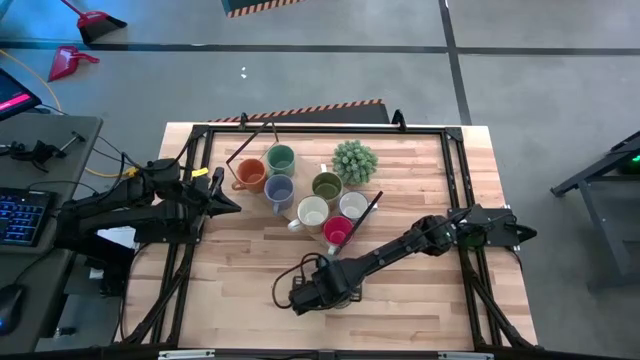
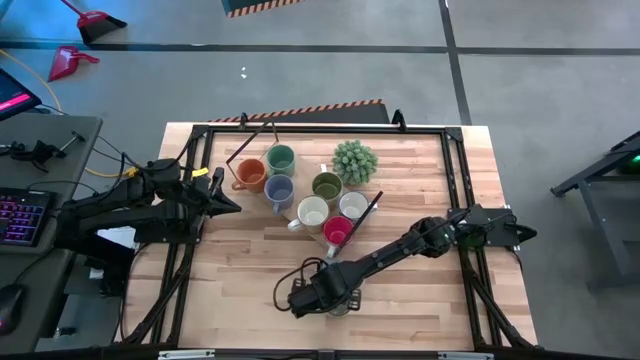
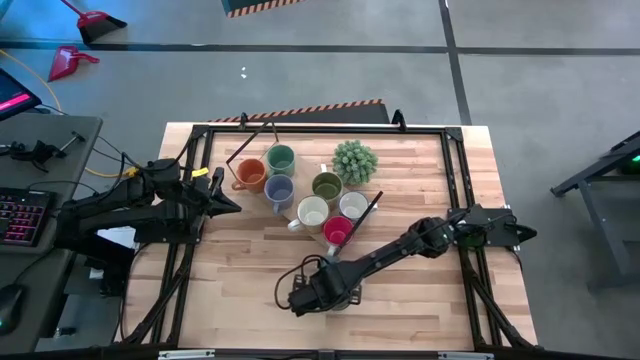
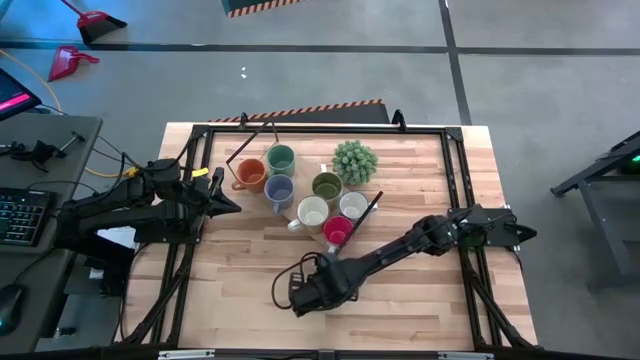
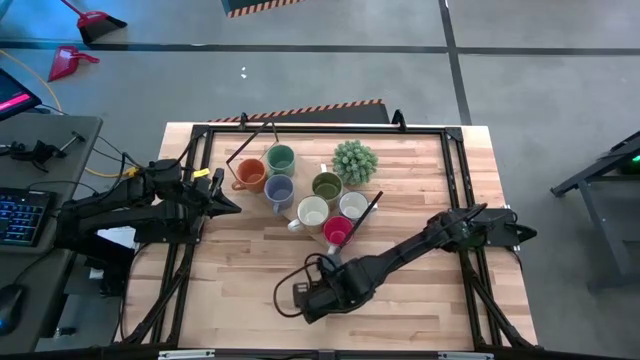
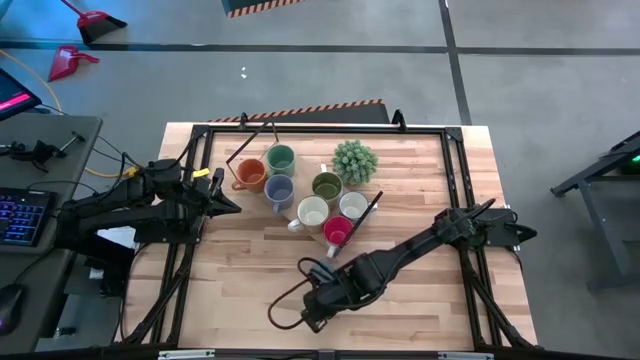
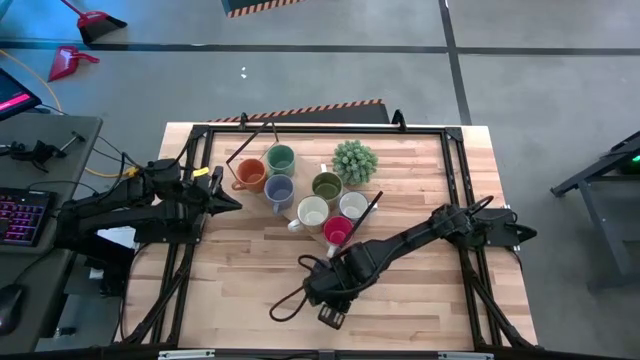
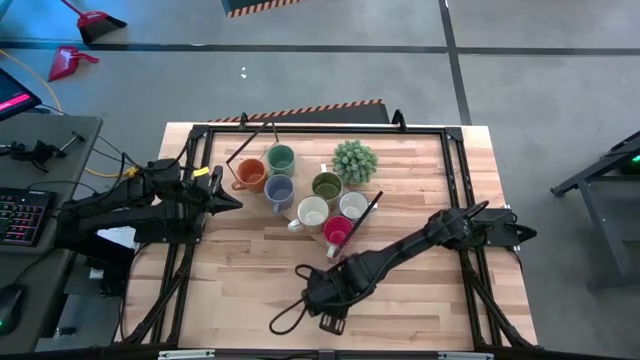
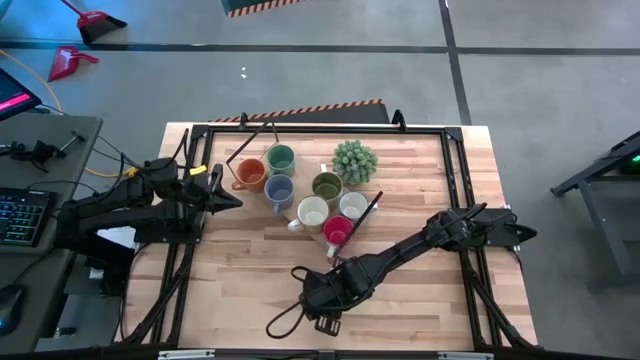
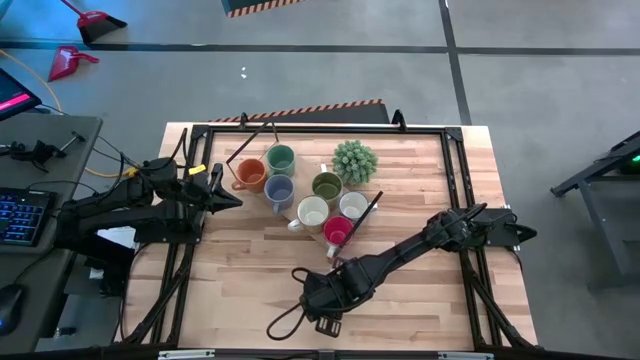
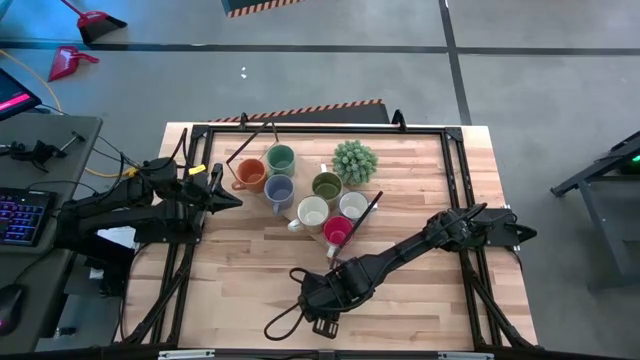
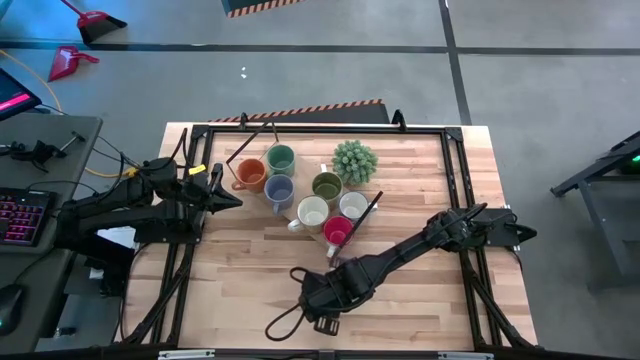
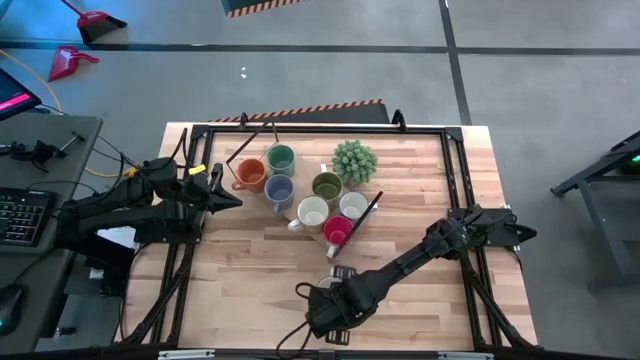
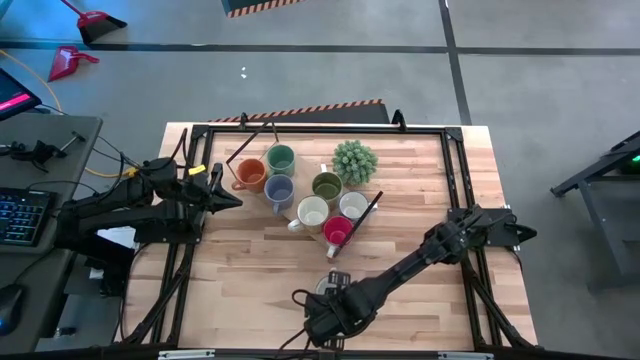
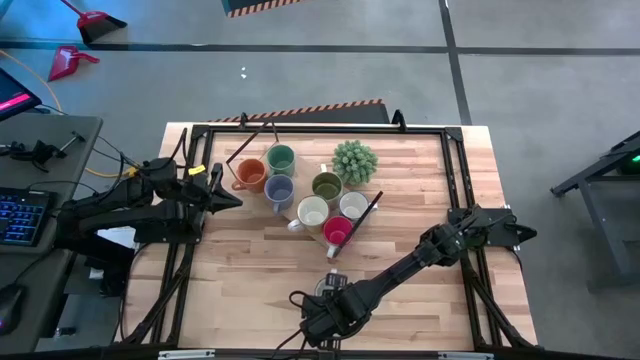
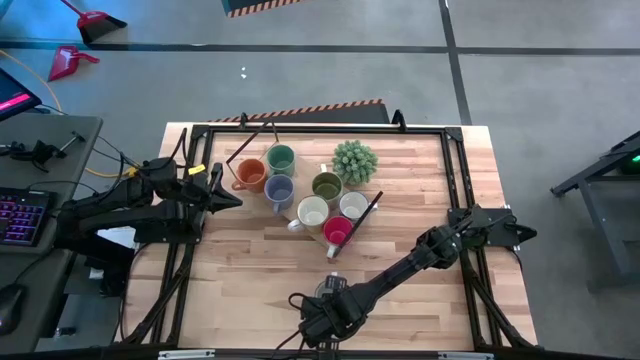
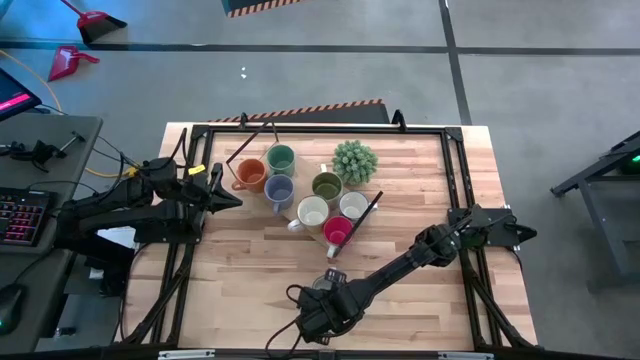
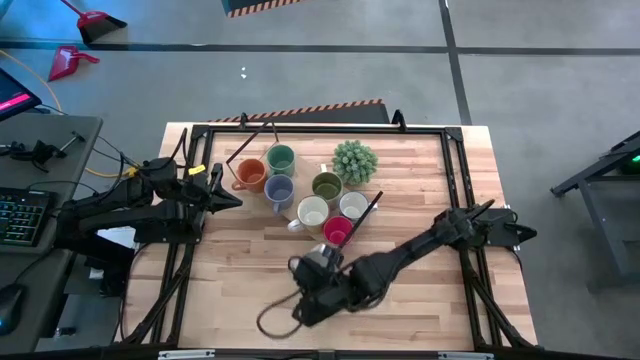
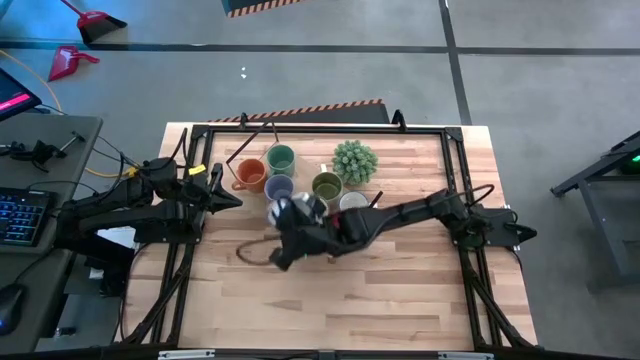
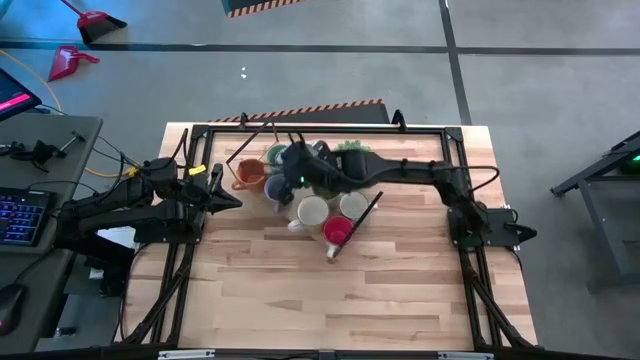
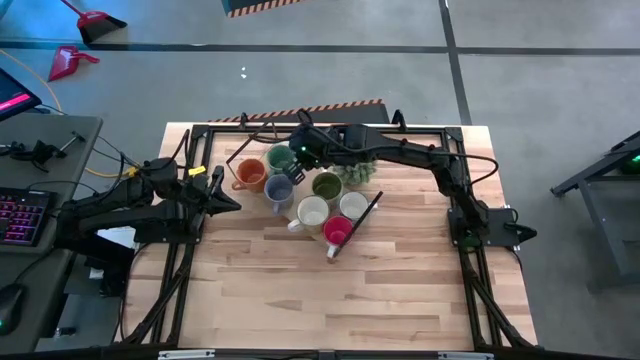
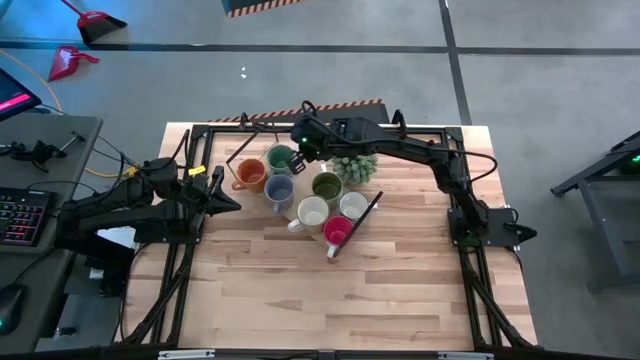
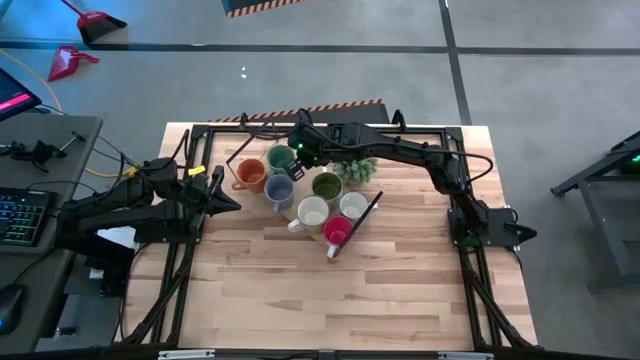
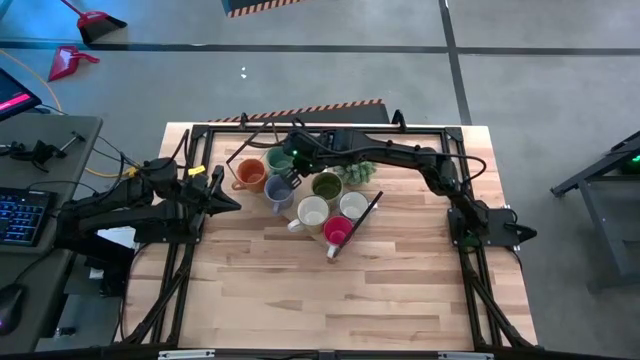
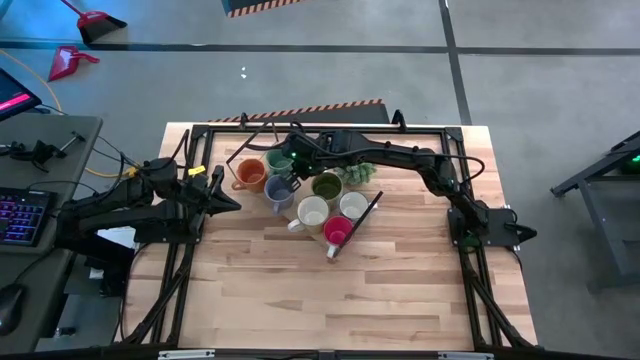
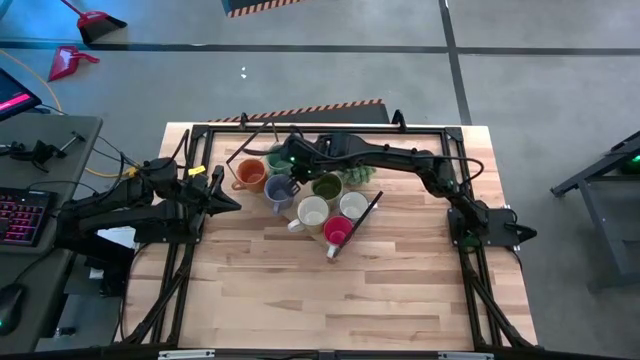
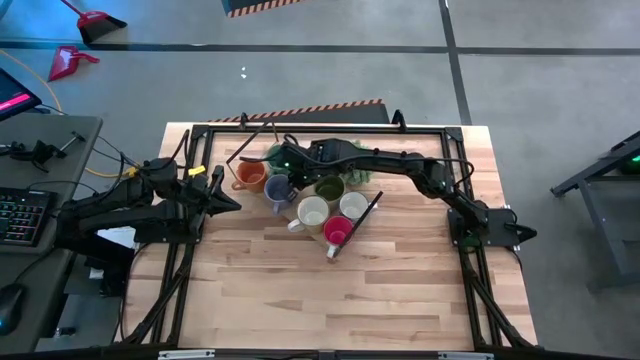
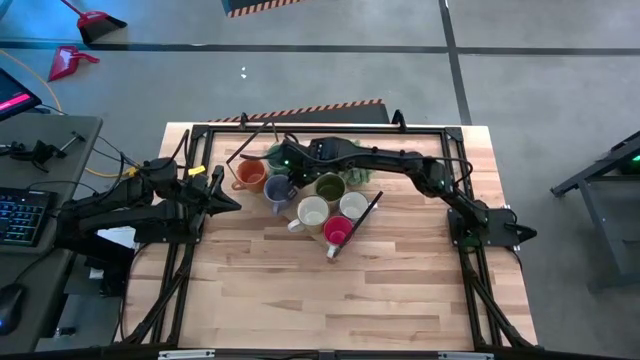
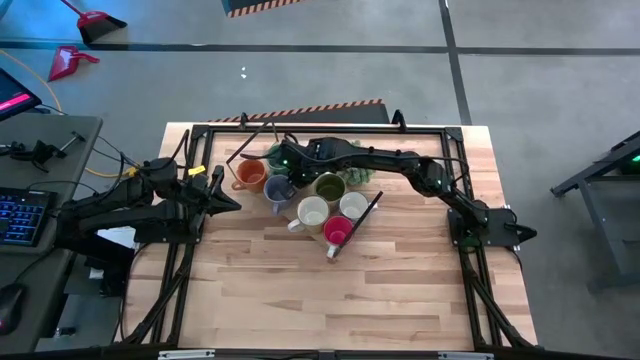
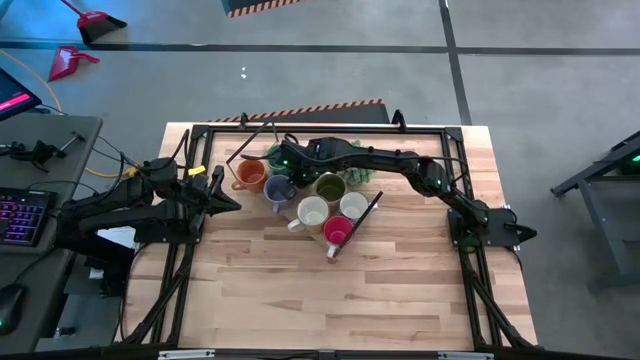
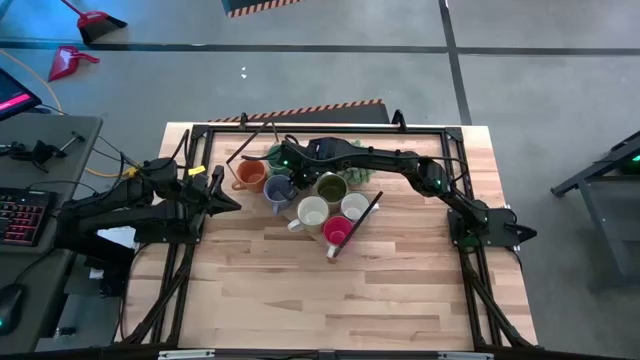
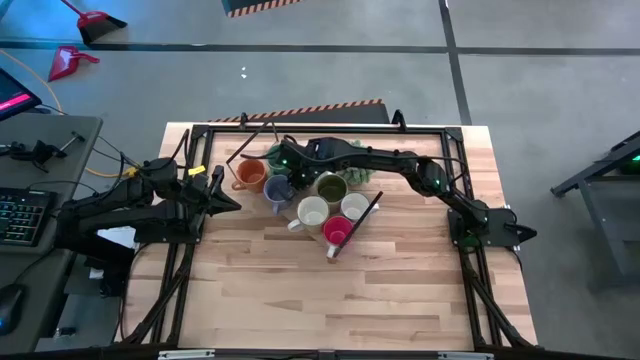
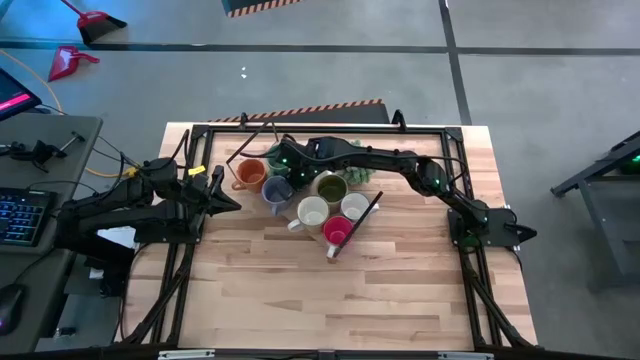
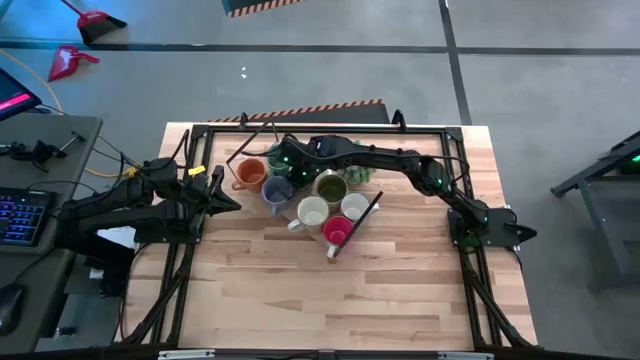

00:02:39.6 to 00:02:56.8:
Task: Place coffee mugs
Put the blue patterned mug on the shelf

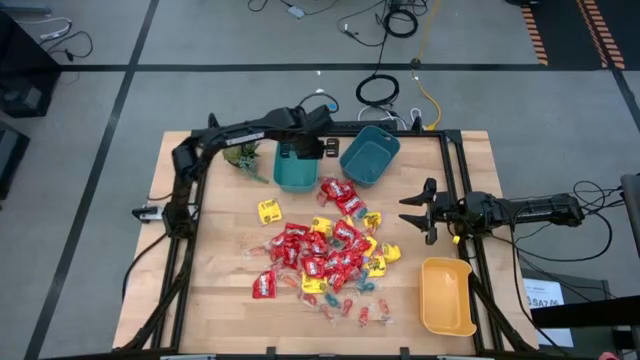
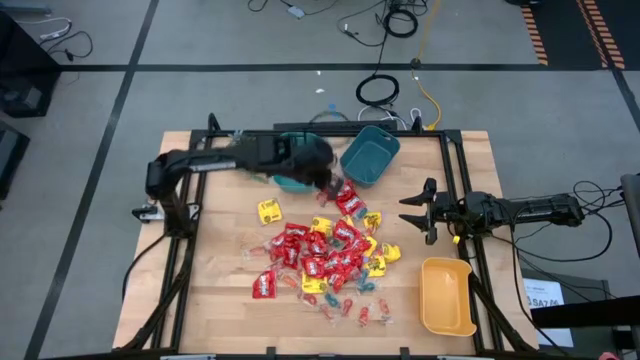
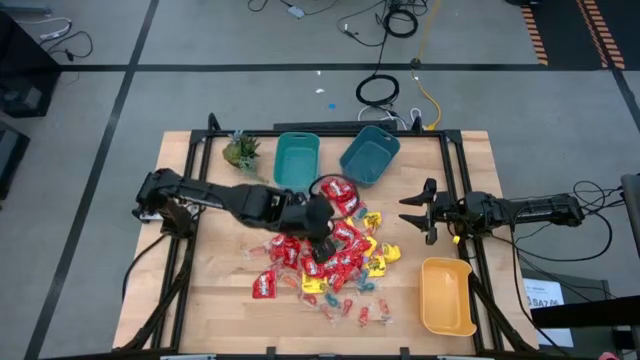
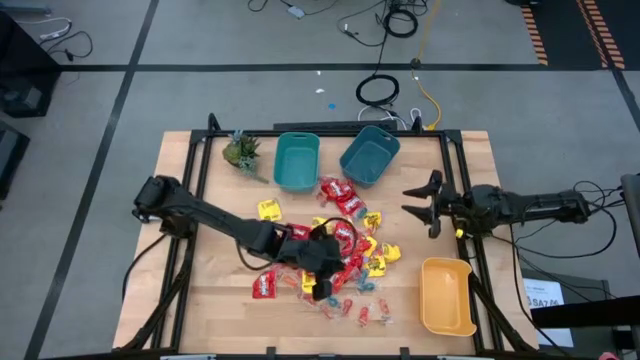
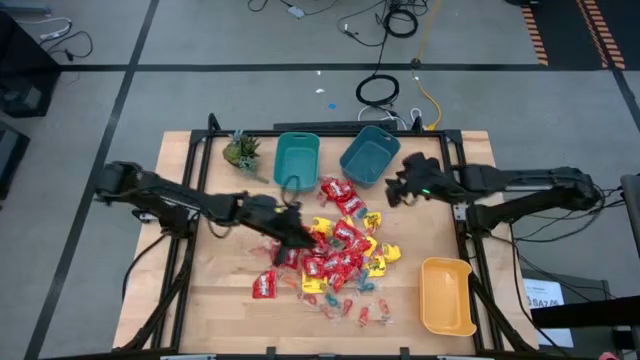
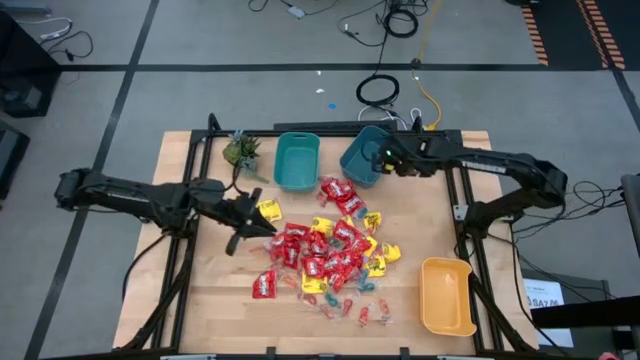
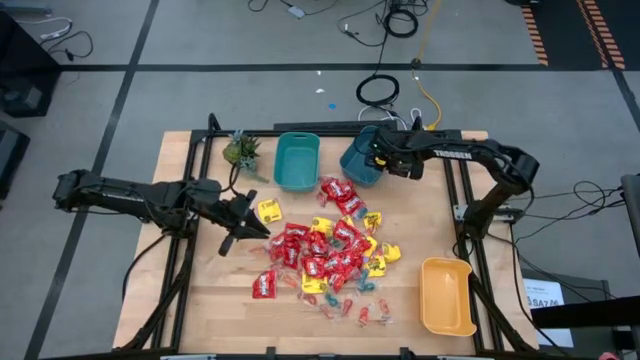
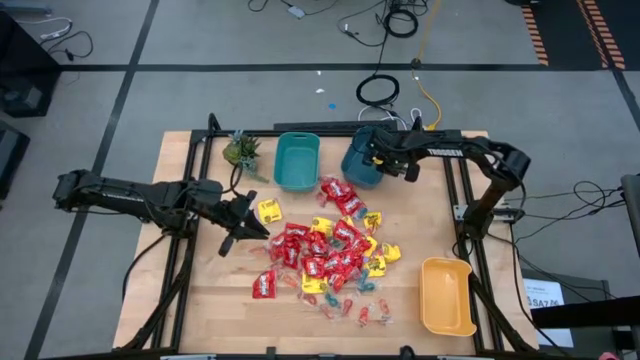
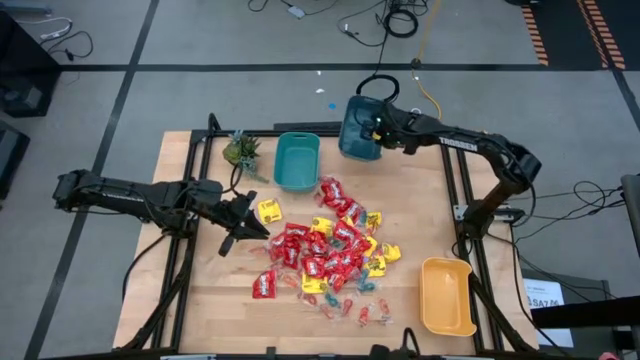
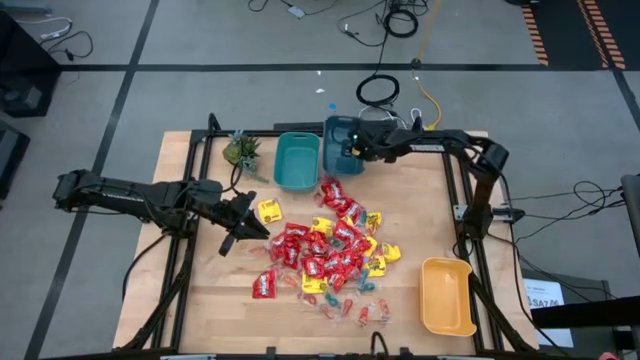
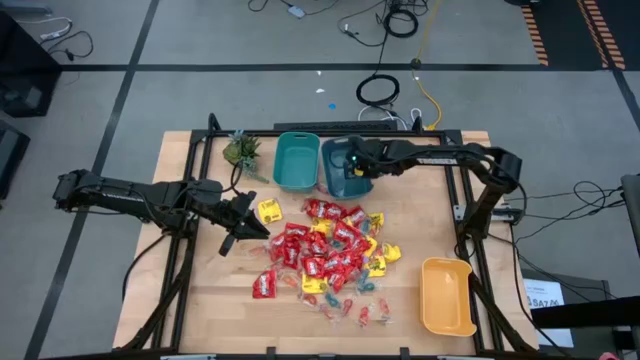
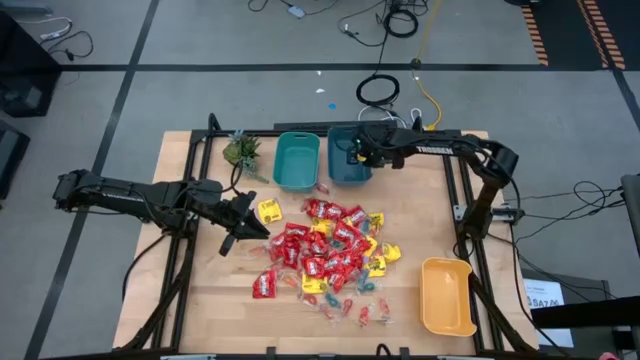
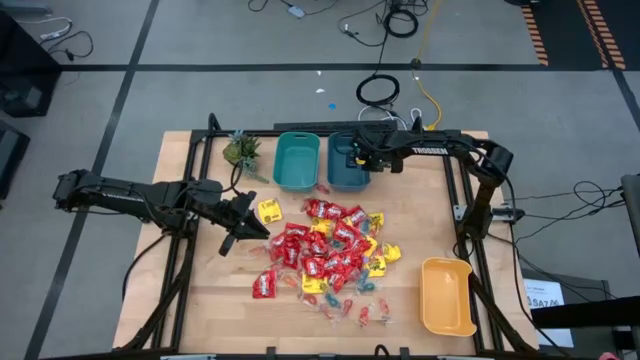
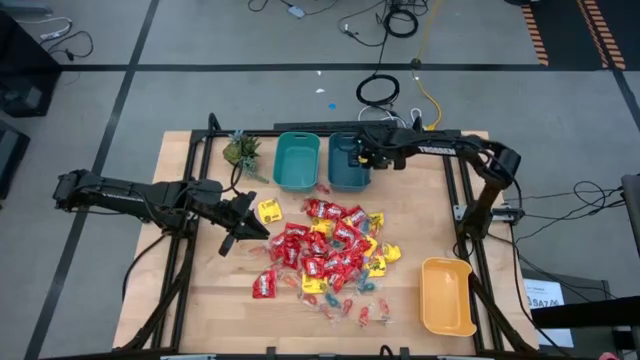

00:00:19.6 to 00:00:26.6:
Task: Sort candy
Adjust the blue bin to the top center
